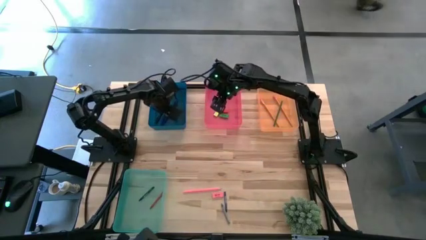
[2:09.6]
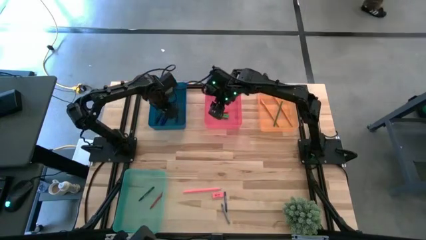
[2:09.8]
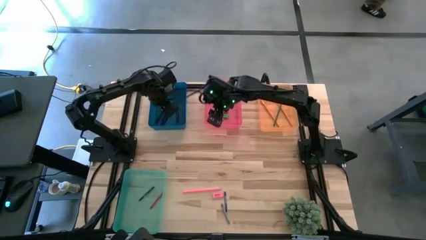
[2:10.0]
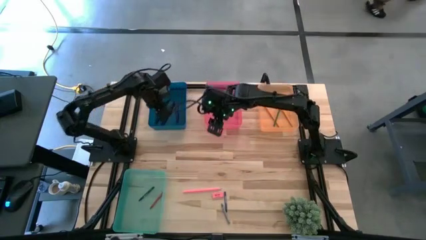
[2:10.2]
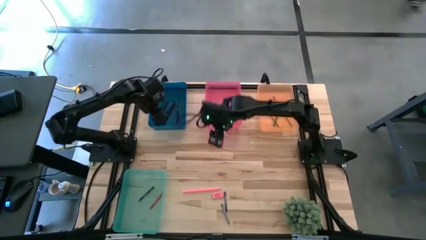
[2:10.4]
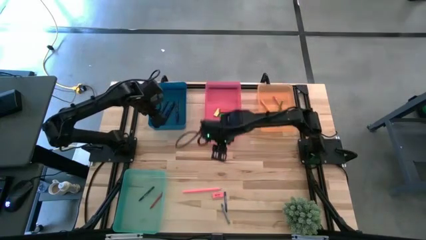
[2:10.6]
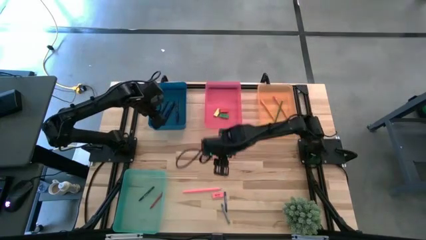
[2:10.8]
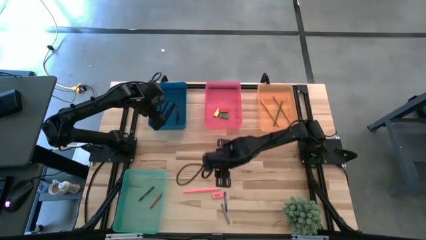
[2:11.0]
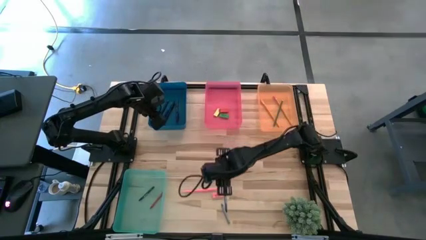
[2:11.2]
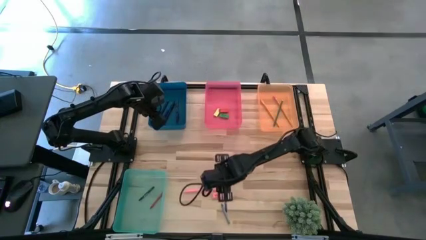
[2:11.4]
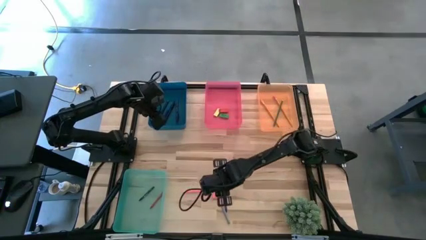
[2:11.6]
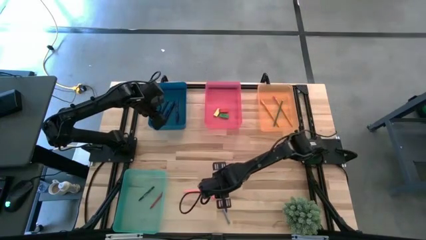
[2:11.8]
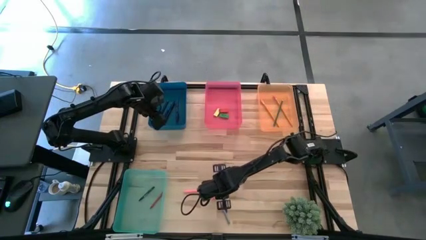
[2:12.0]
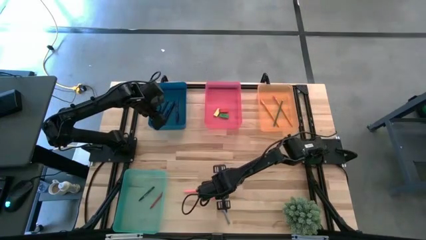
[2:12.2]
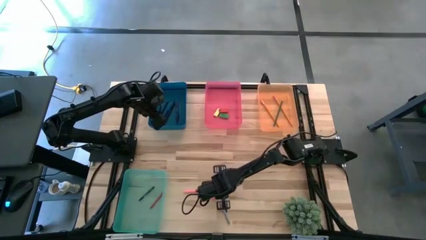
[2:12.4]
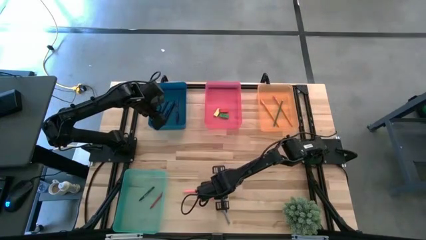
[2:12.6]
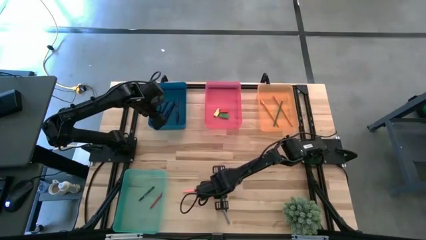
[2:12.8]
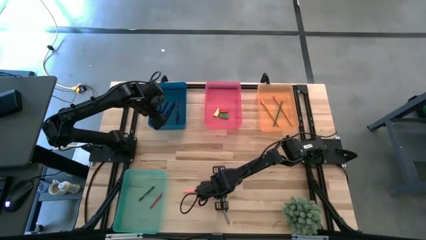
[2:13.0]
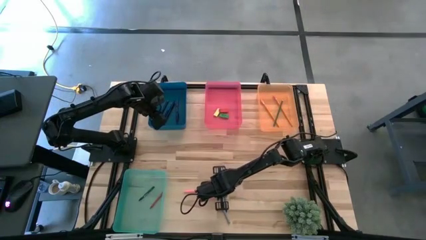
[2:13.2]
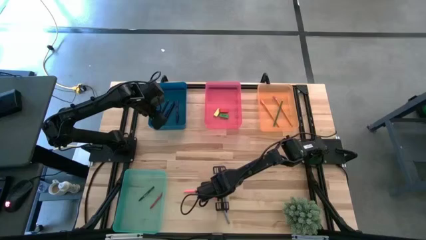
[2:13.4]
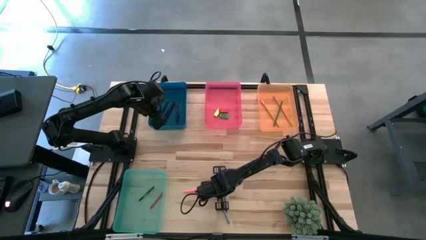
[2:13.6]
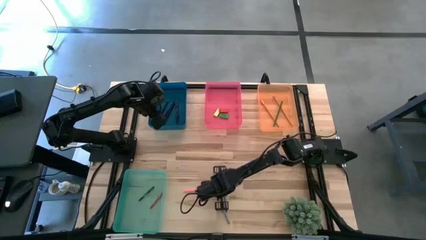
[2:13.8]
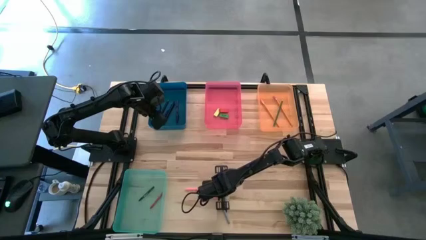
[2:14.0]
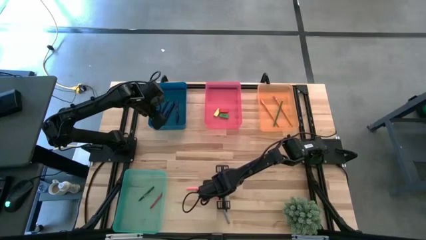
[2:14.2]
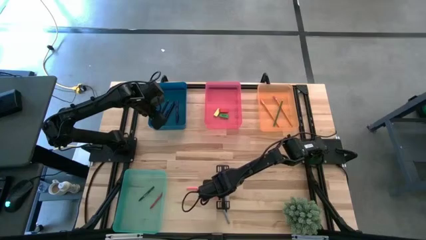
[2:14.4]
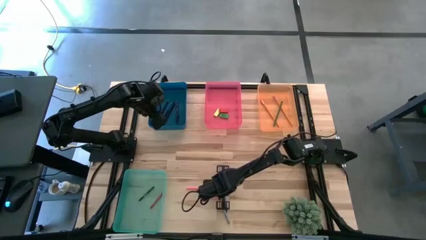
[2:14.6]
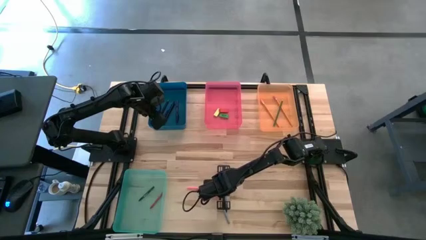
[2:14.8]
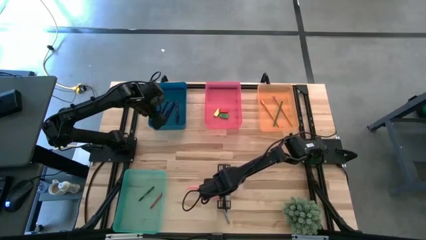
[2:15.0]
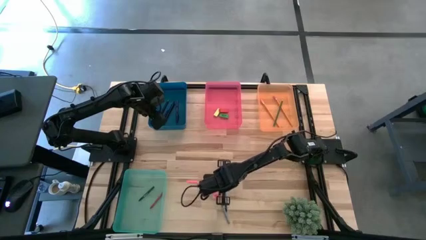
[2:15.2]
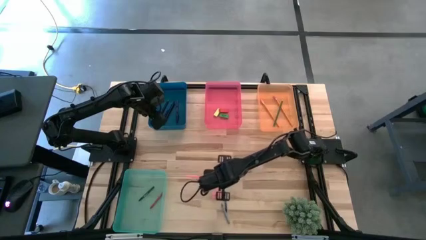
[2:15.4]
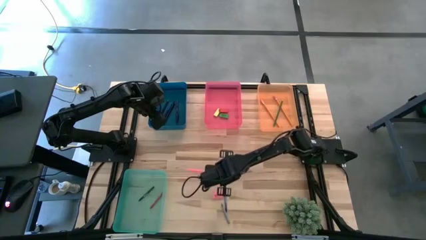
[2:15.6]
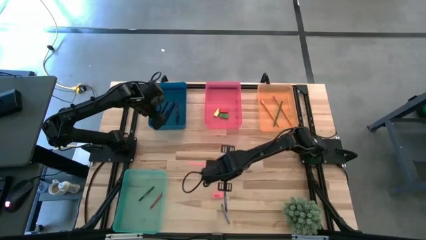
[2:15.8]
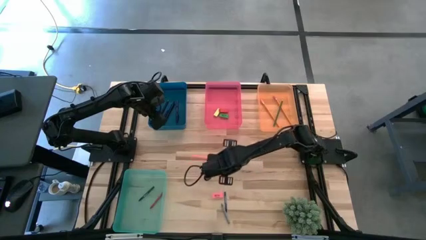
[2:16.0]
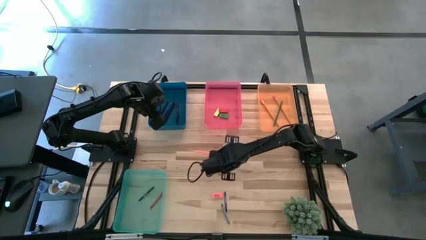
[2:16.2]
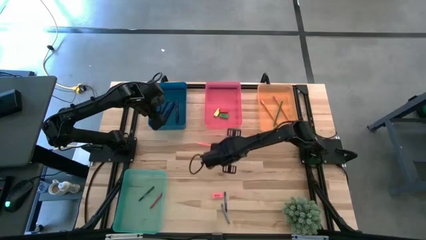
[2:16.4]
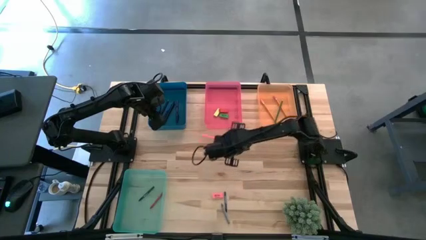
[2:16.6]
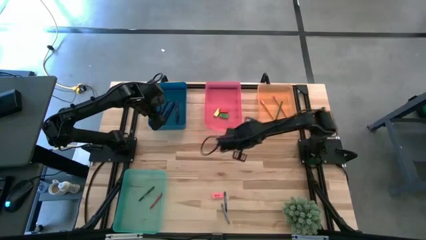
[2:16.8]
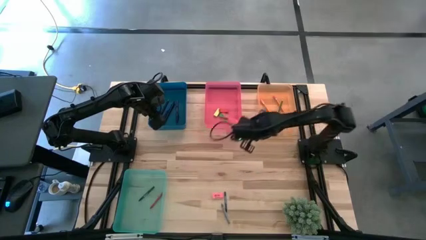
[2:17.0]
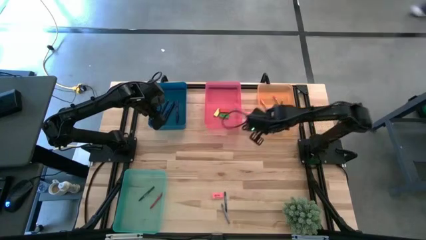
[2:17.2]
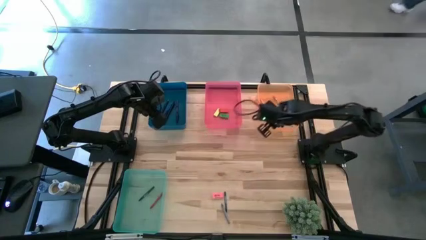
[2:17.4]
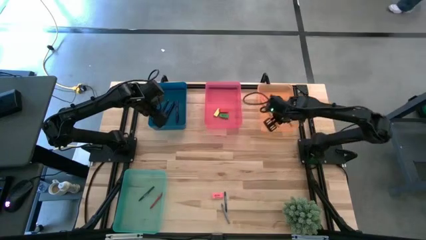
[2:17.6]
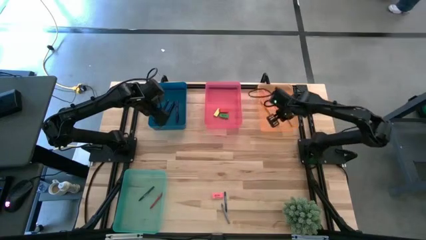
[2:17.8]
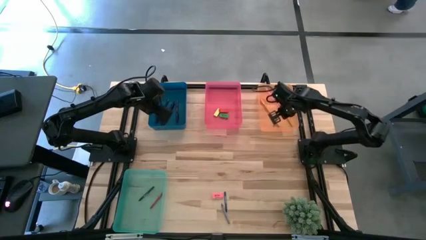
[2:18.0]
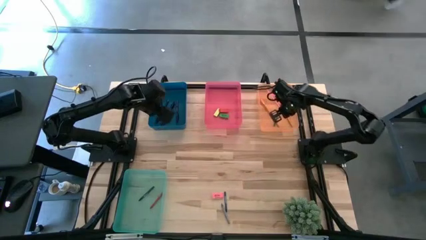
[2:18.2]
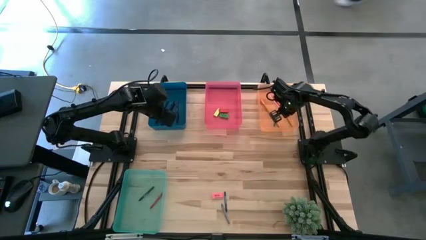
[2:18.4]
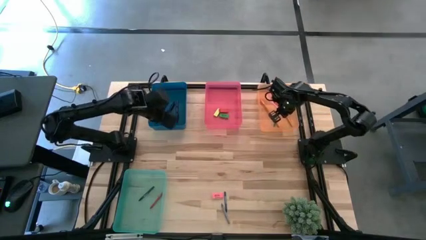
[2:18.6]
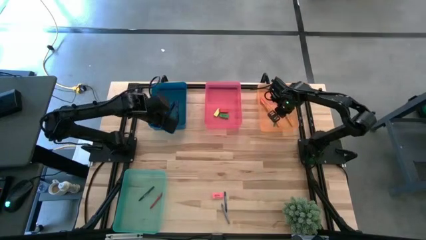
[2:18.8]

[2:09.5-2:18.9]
Task: Sort crayons/erasers/pens/pencils in bins
Put the pink pencil into the orange bin
